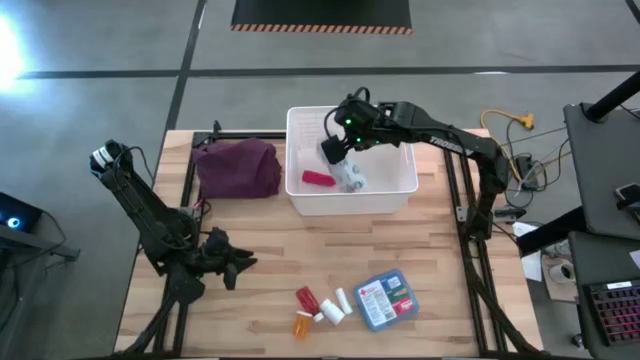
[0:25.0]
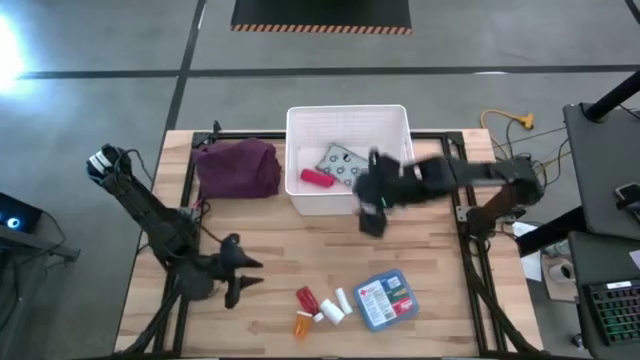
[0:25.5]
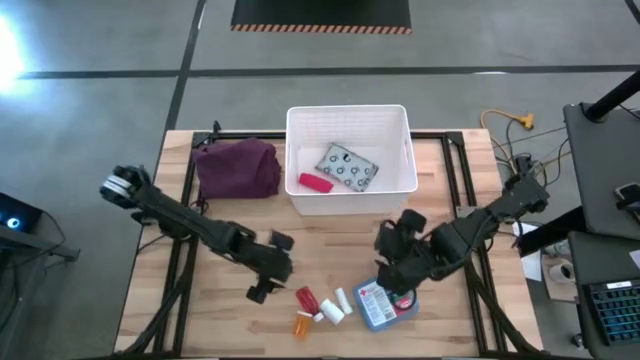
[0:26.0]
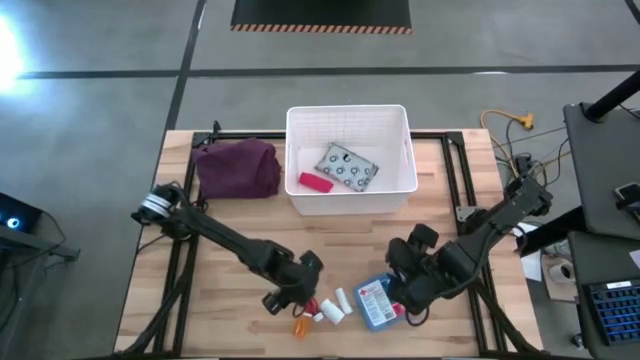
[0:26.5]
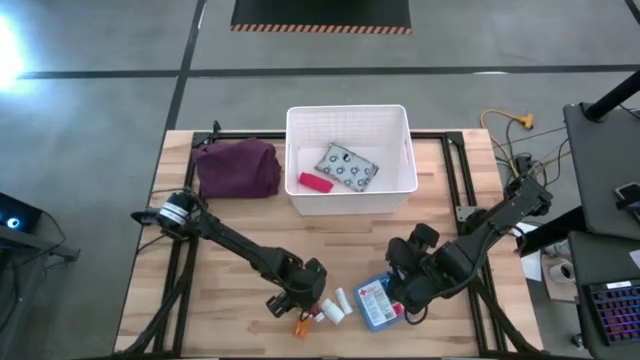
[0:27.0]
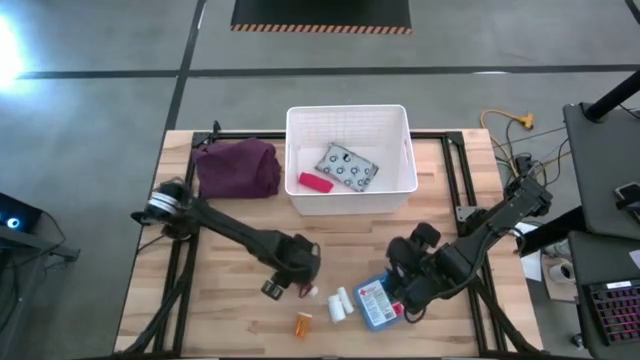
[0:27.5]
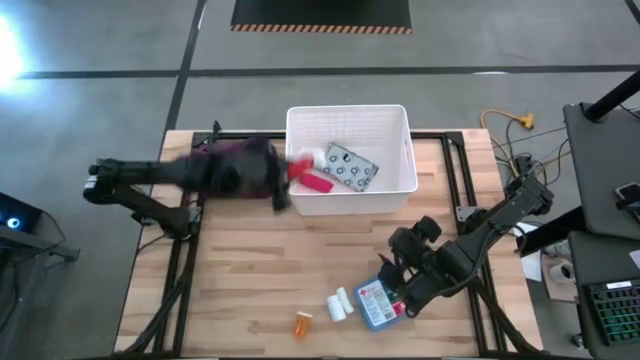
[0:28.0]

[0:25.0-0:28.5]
Task: Pick & place medical supplies in basket/bin
Put the orange pill bottle into the white bin

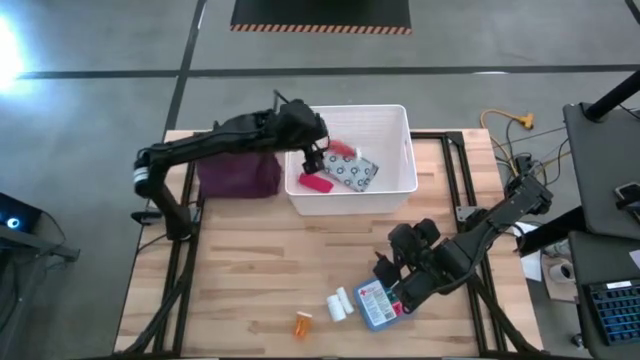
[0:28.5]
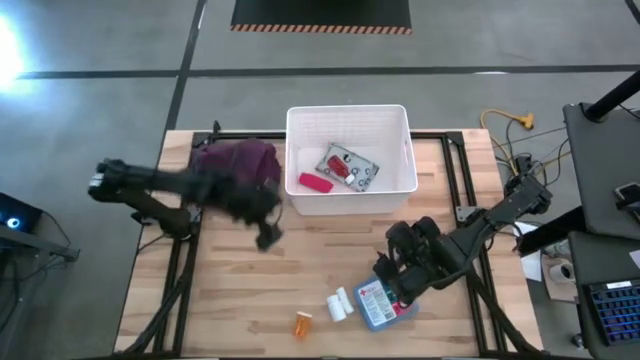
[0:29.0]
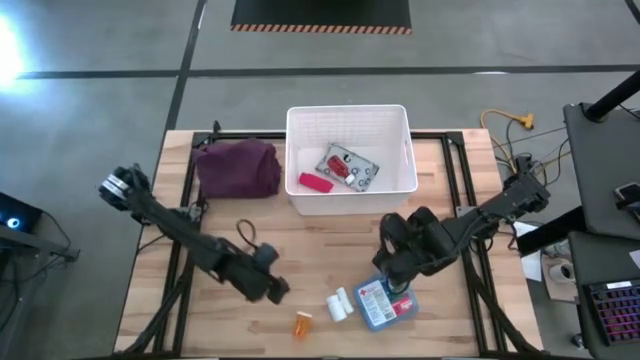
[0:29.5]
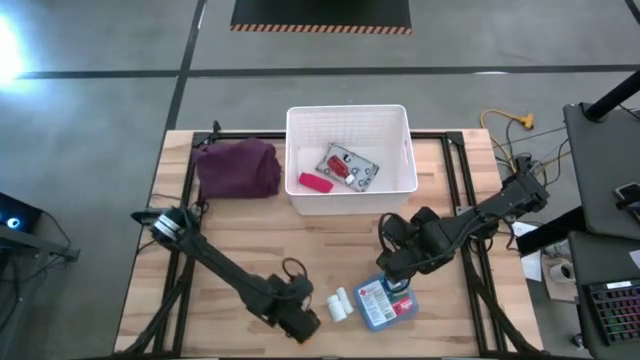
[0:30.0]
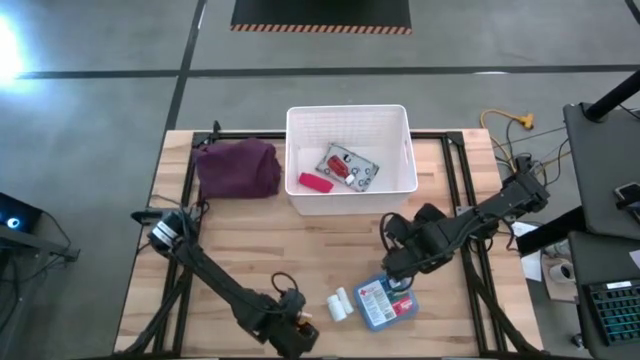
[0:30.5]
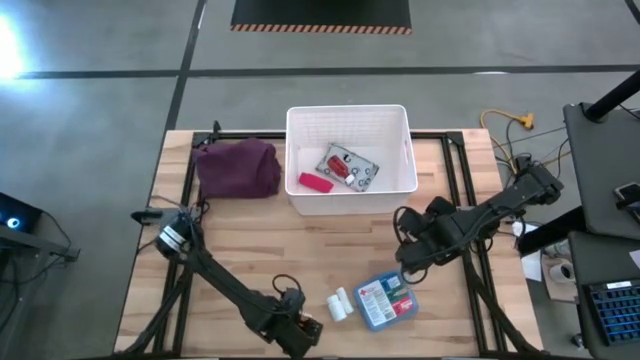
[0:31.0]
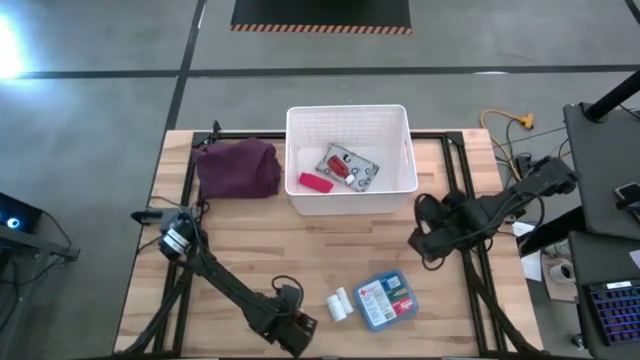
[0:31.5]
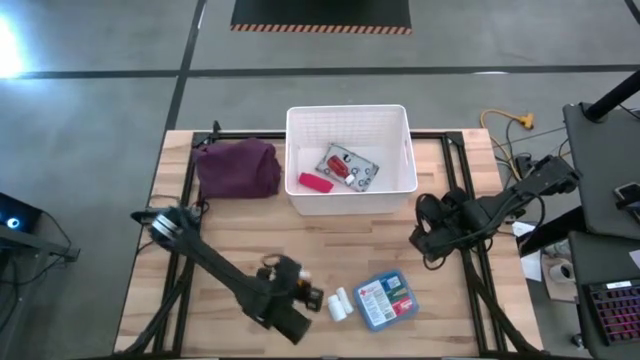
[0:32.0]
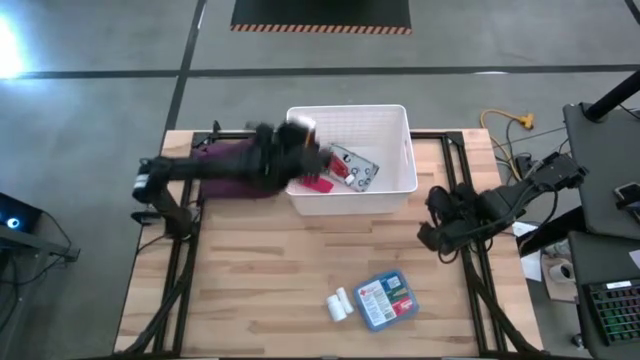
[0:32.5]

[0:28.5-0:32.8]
Put the yellow pill bottle into the white bin

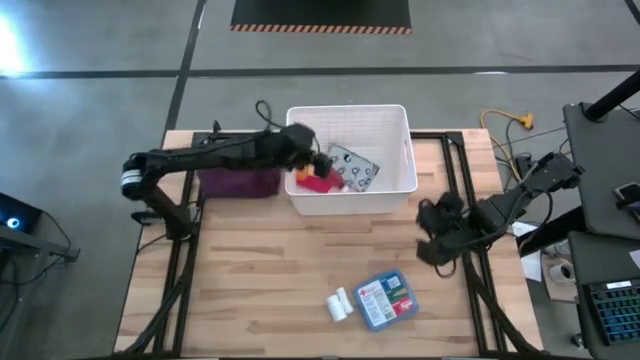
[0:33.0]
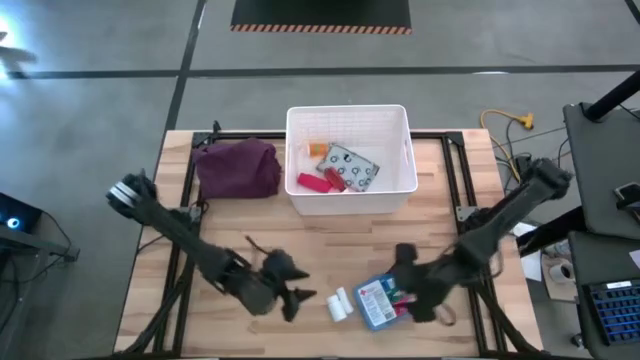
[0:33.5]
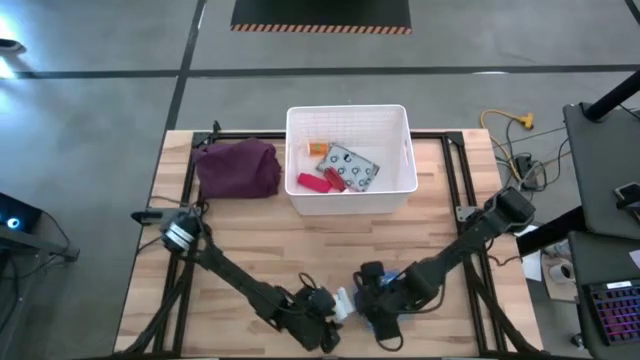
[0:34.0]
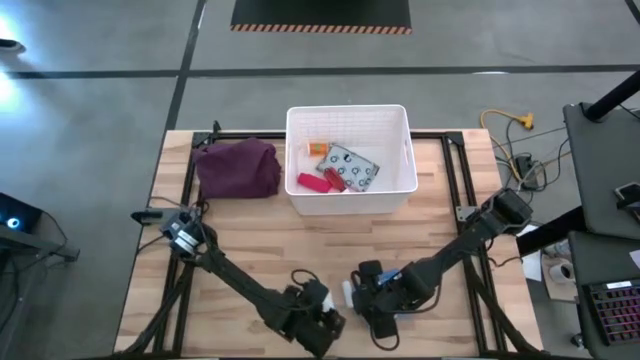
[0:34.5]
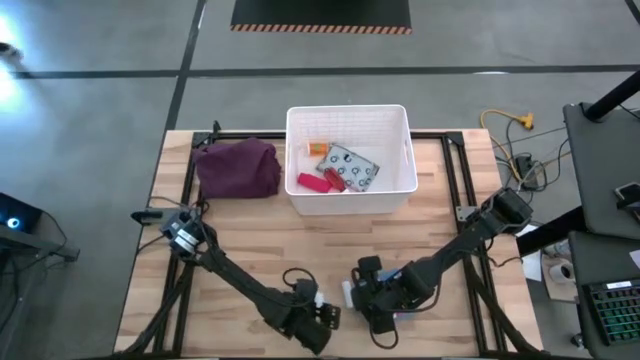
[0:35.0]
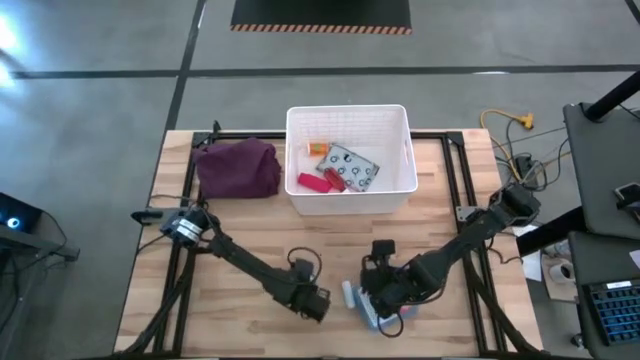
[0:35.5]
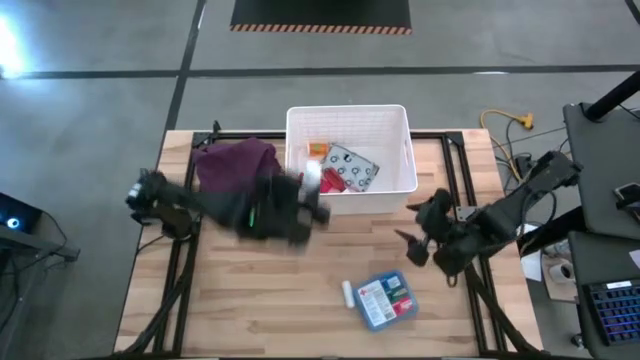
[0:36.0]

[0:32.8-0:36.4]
Put the white pill bottle into the white bin

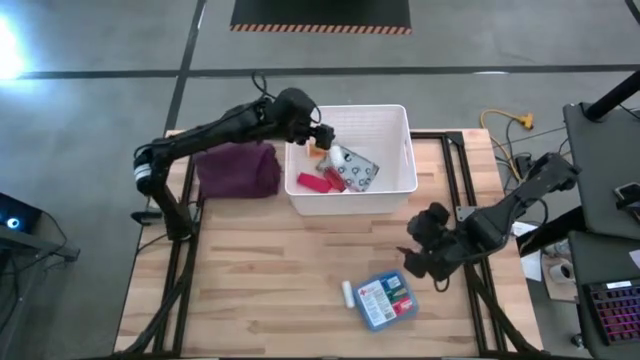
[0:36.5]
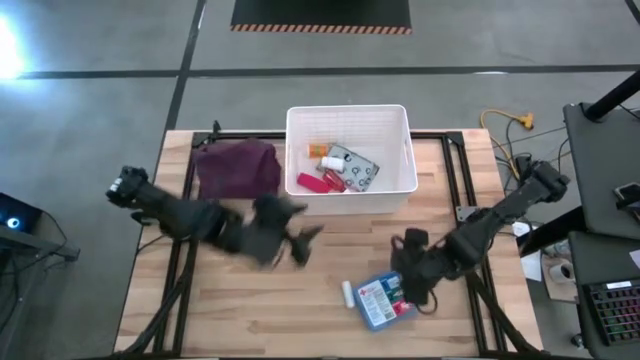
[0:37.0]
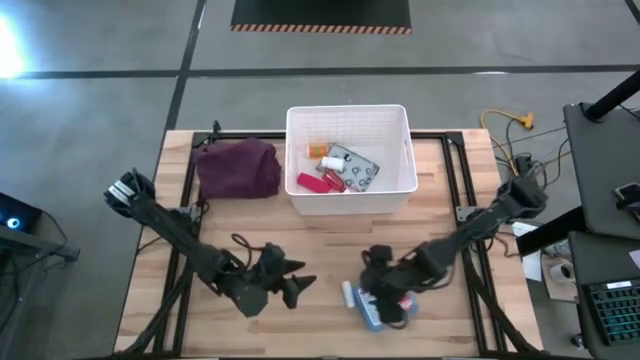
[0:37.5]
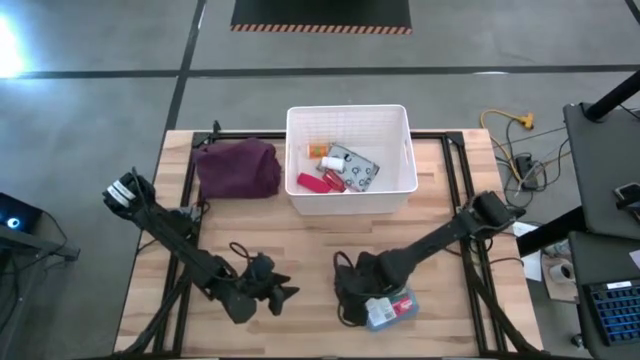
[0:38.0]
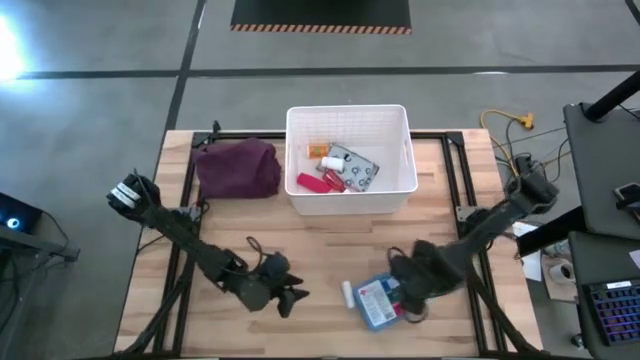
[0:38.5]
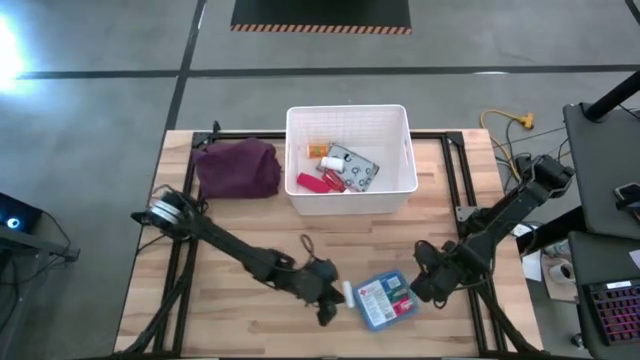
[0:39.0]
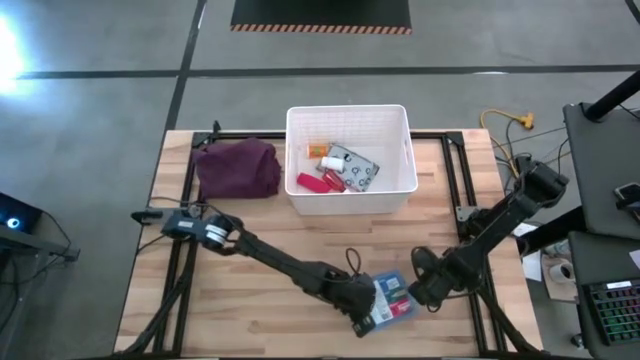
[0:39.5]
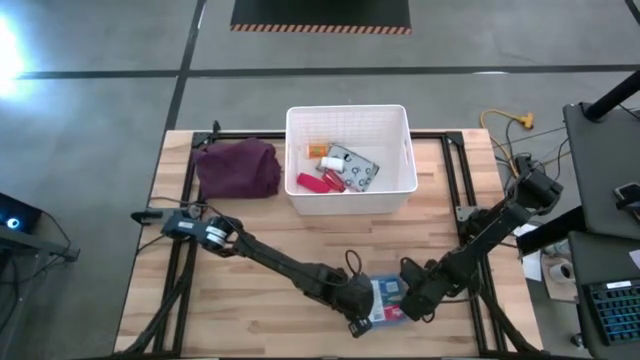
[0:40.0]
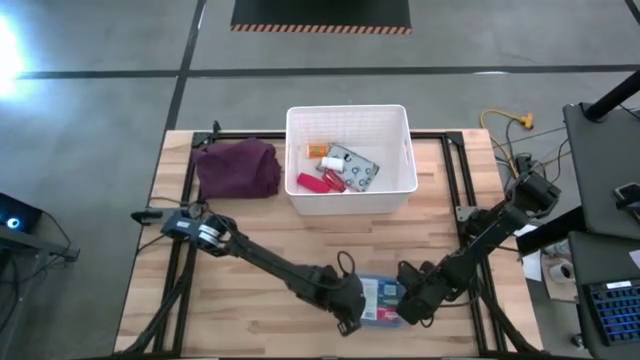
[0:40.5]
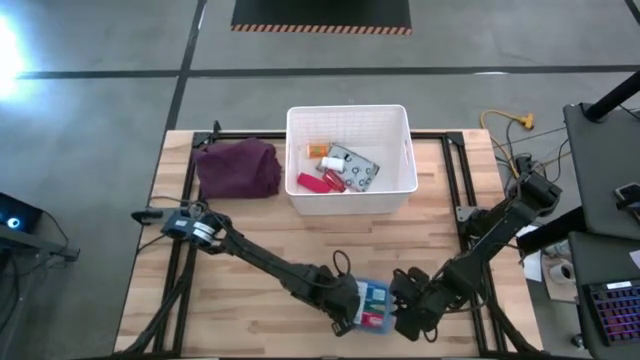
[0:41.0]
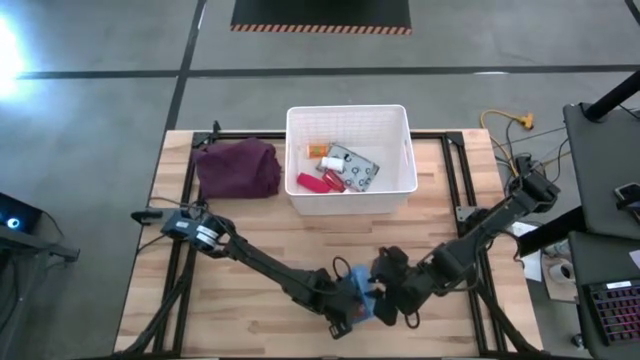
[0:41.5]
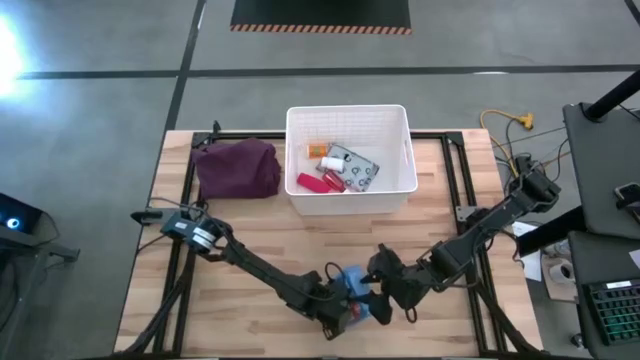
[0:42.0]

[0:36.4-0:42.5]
Put the blue first aid kit into the white bin

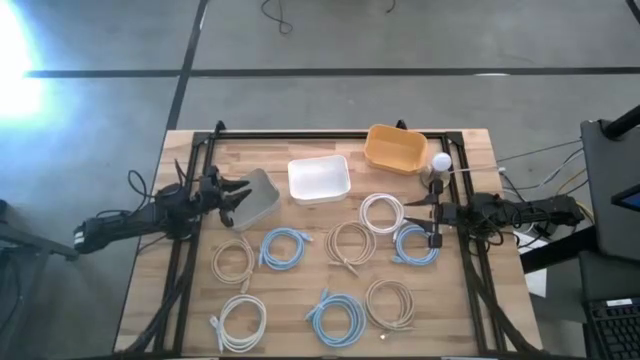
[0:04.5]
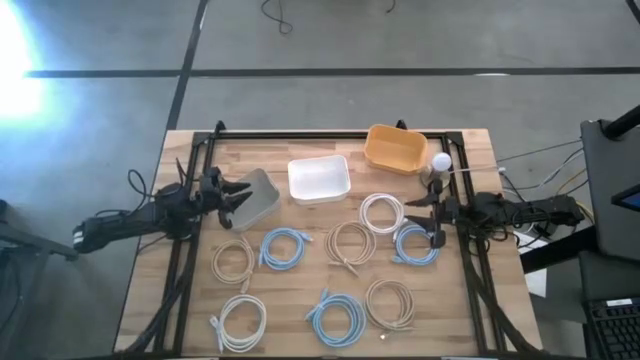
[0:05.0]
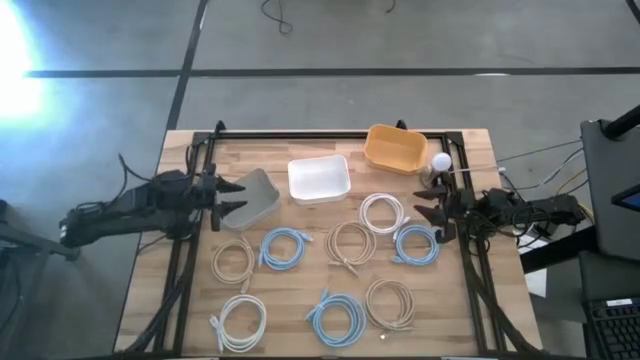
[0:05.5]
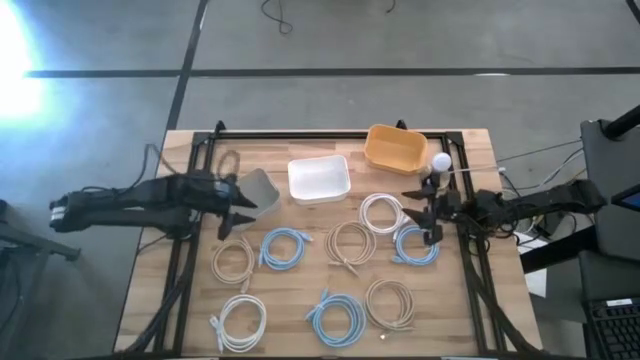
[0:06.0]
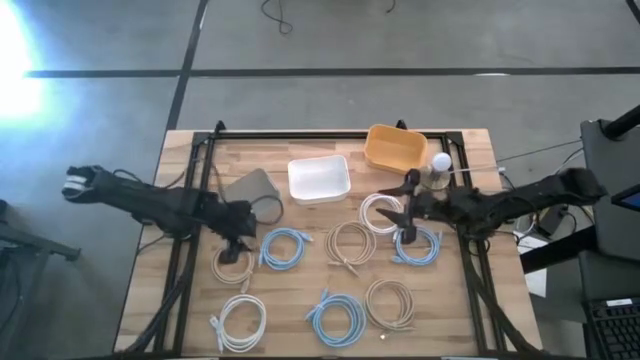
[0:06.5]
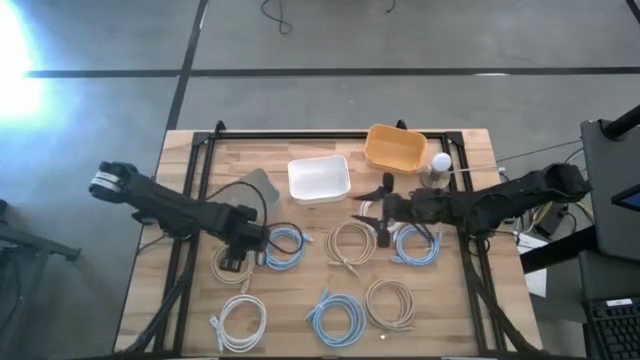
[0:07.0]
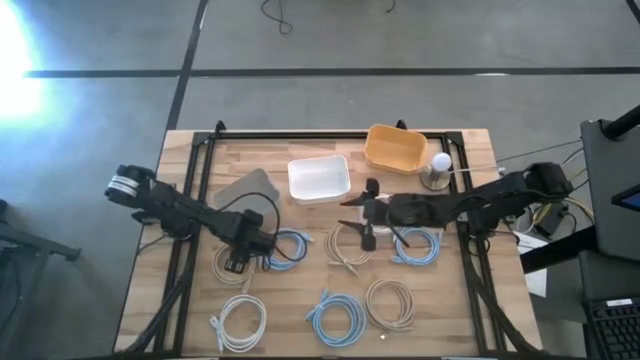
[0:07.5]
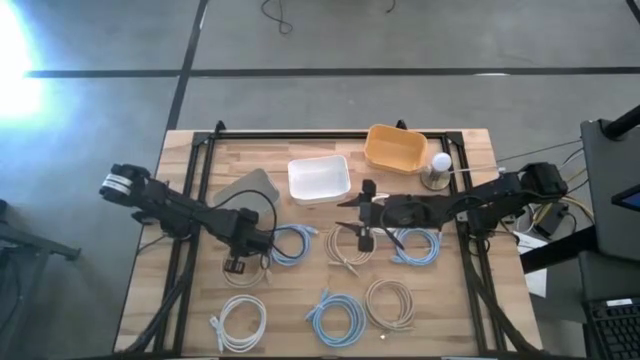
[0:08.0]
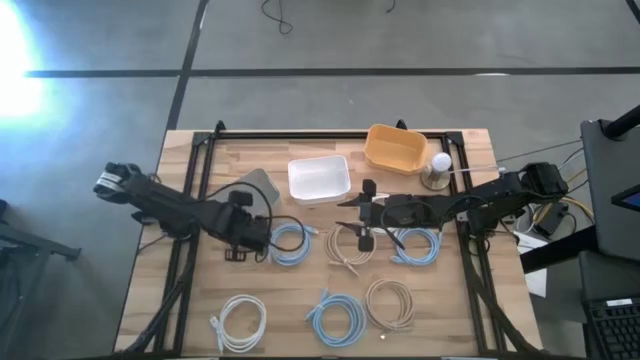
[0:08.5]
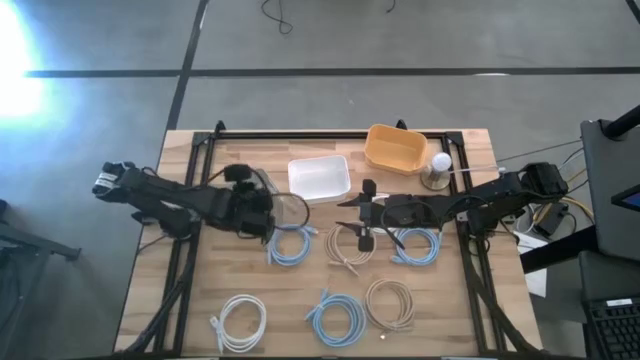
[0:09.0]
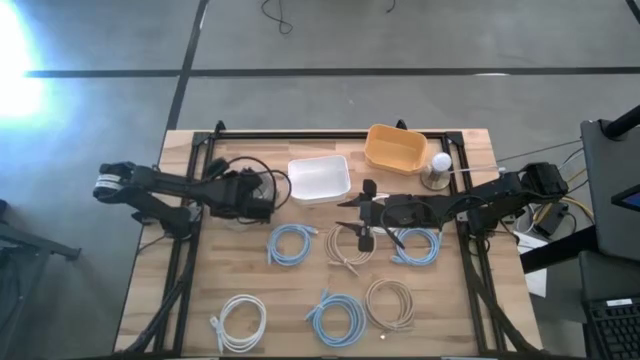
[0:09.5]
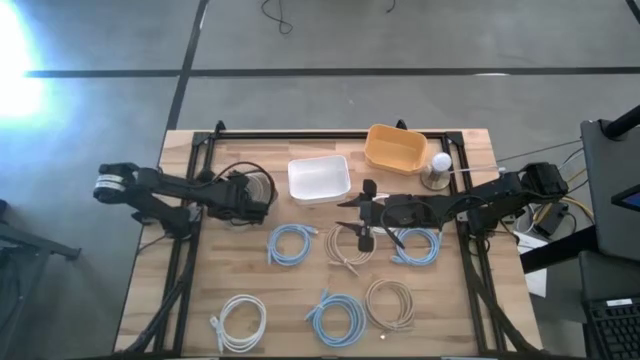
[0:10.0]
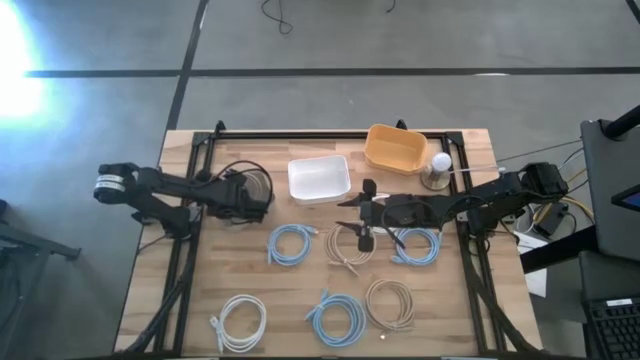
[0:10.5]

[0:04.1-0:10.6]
Task: Sort HDMI cables
Put the top left brown HDMI cable into the gray bin
